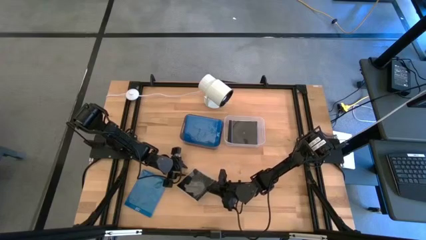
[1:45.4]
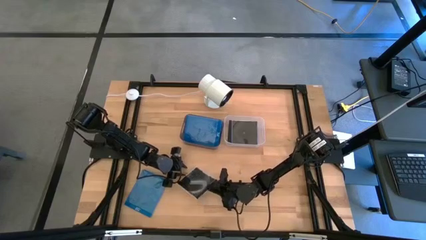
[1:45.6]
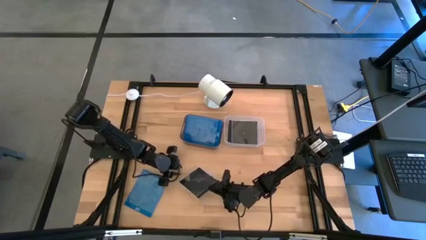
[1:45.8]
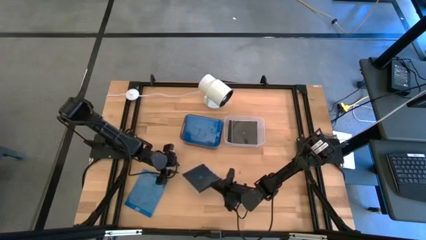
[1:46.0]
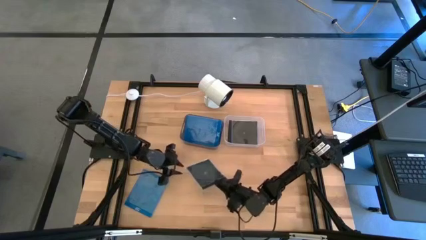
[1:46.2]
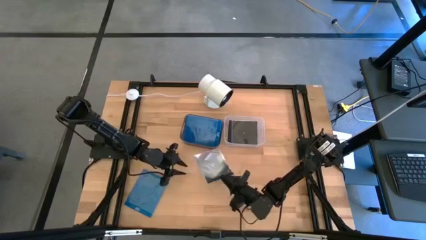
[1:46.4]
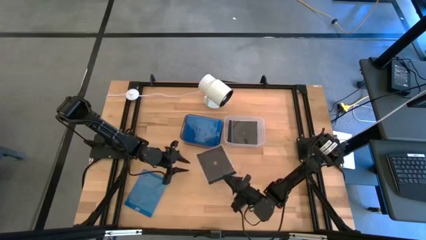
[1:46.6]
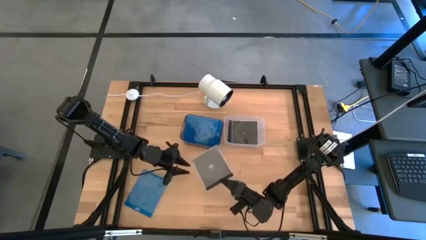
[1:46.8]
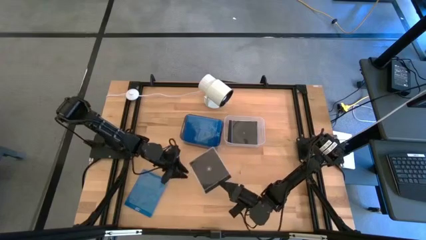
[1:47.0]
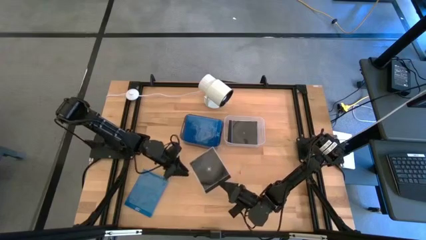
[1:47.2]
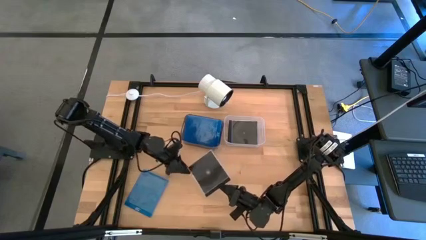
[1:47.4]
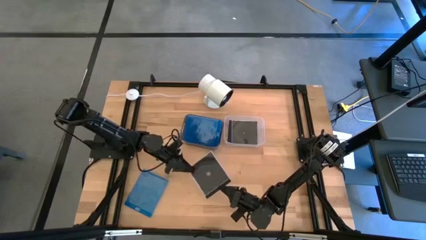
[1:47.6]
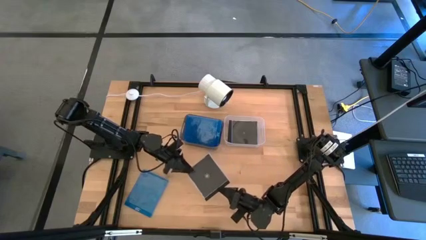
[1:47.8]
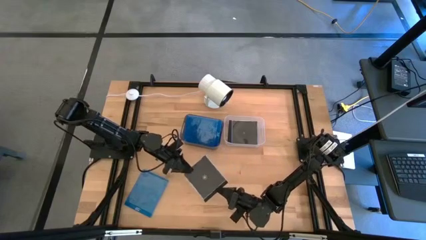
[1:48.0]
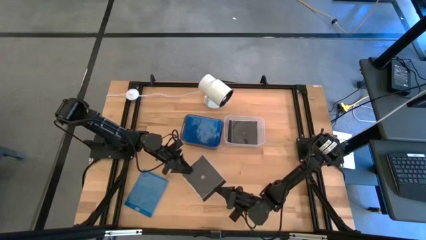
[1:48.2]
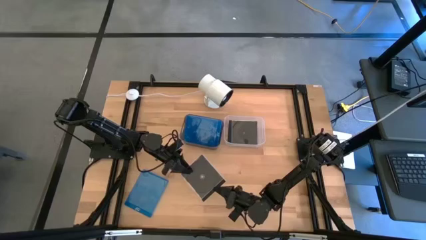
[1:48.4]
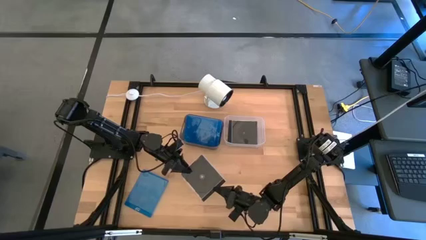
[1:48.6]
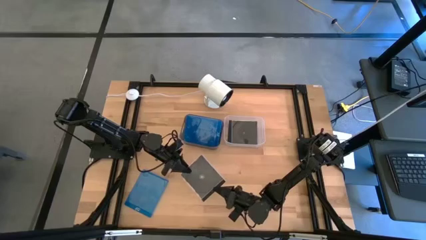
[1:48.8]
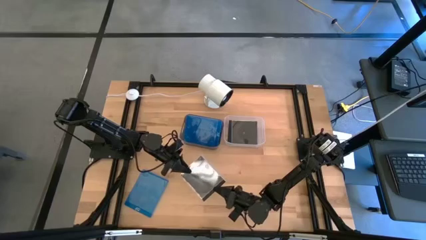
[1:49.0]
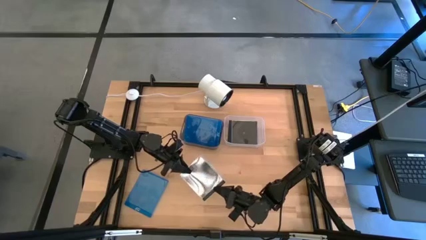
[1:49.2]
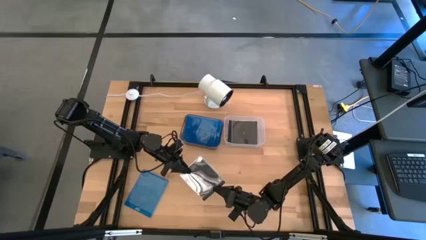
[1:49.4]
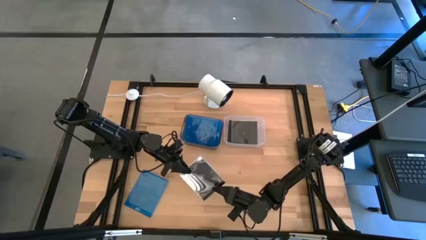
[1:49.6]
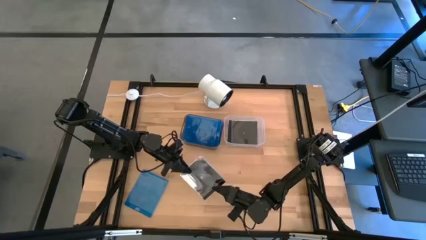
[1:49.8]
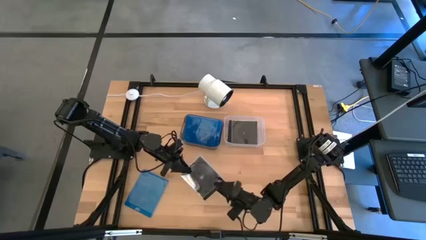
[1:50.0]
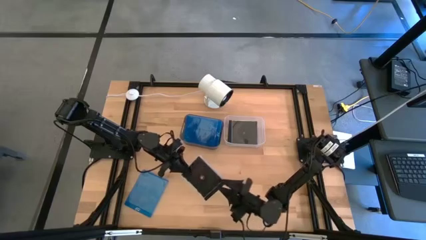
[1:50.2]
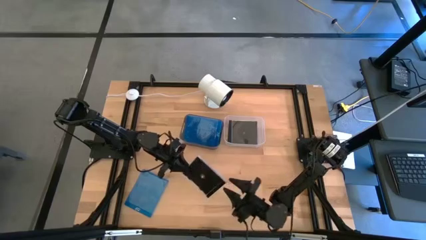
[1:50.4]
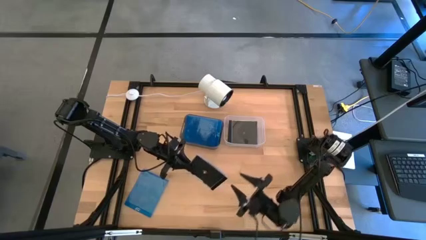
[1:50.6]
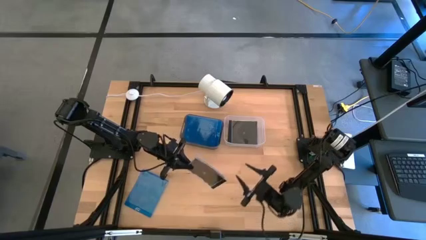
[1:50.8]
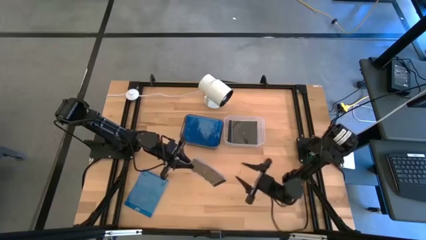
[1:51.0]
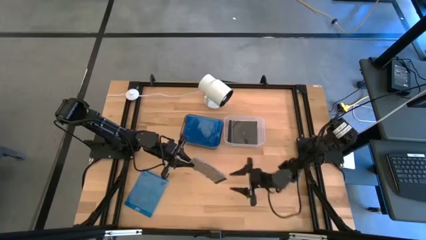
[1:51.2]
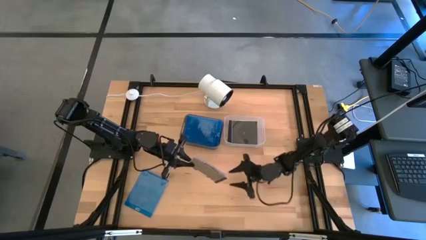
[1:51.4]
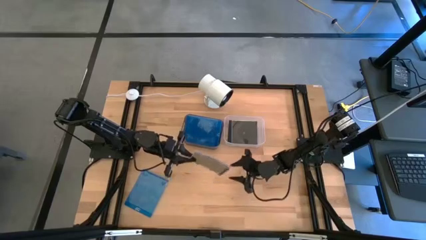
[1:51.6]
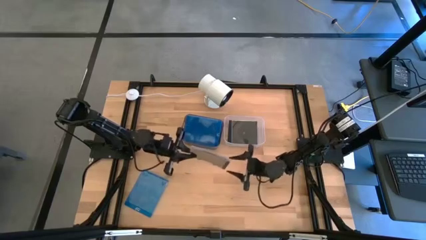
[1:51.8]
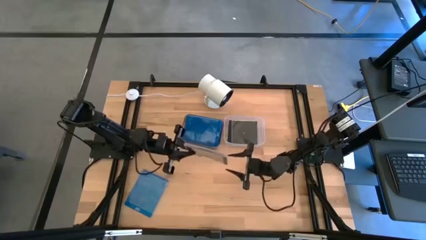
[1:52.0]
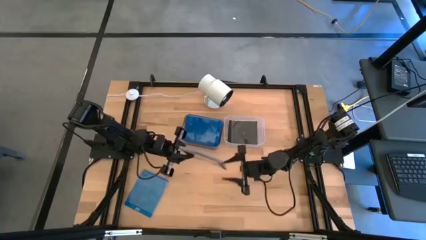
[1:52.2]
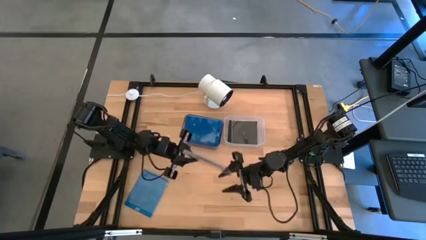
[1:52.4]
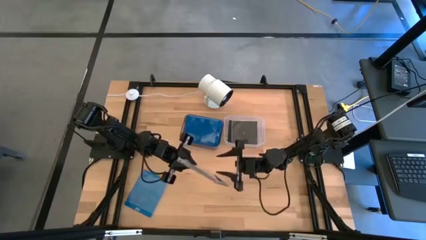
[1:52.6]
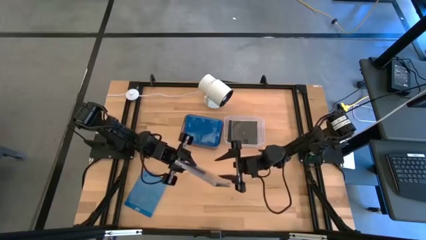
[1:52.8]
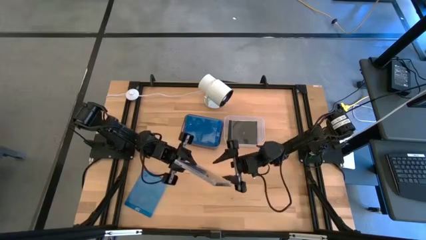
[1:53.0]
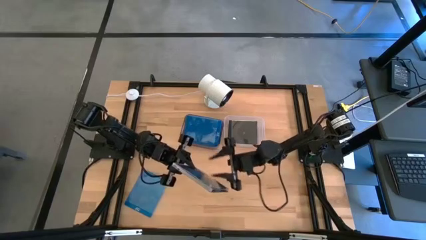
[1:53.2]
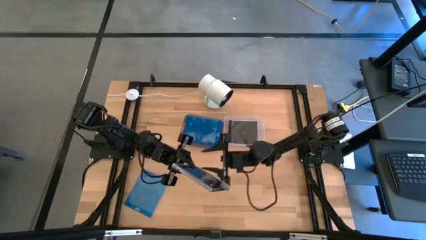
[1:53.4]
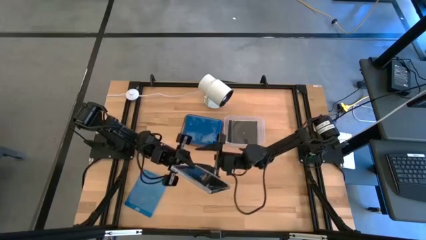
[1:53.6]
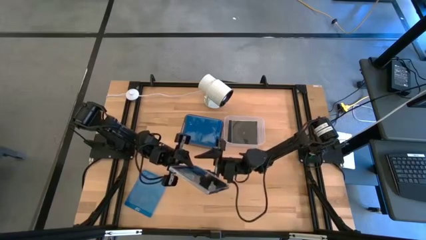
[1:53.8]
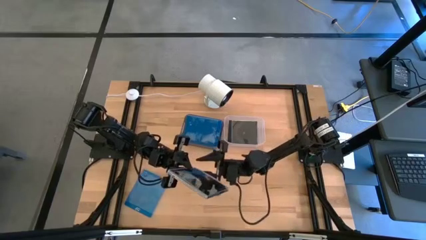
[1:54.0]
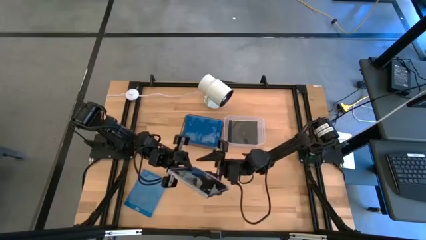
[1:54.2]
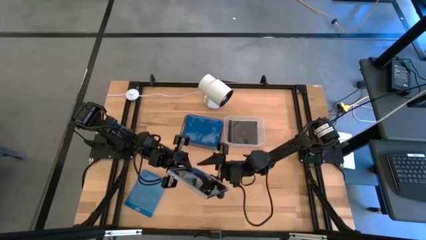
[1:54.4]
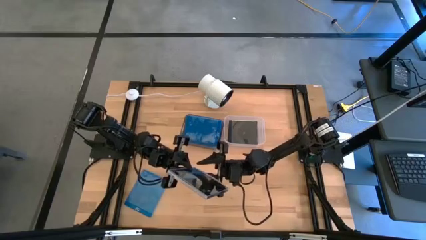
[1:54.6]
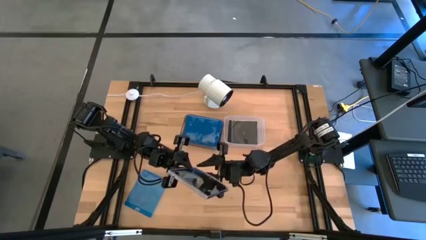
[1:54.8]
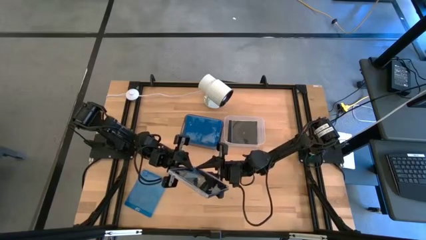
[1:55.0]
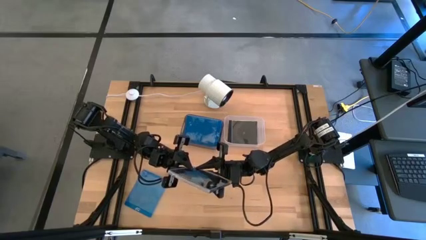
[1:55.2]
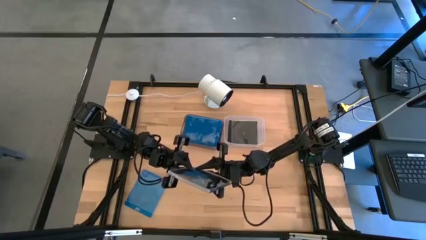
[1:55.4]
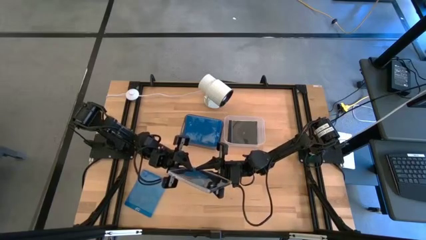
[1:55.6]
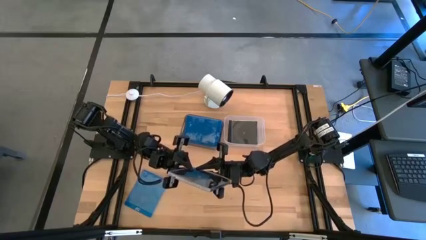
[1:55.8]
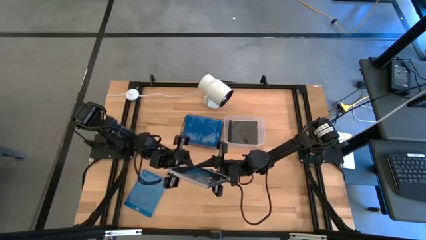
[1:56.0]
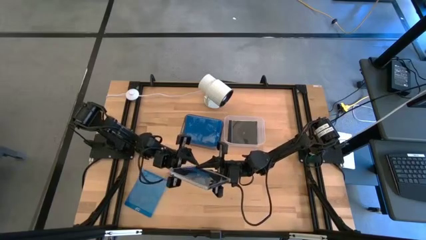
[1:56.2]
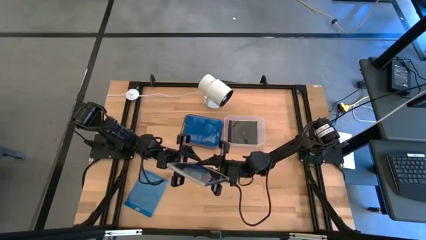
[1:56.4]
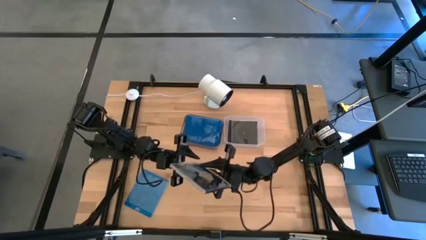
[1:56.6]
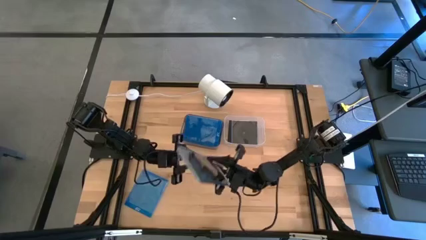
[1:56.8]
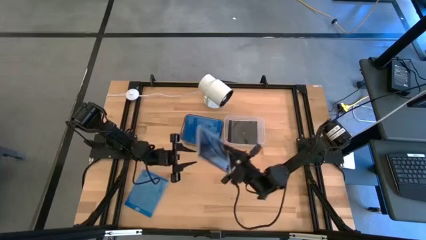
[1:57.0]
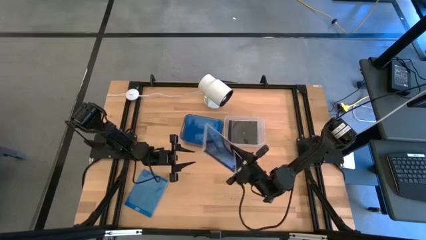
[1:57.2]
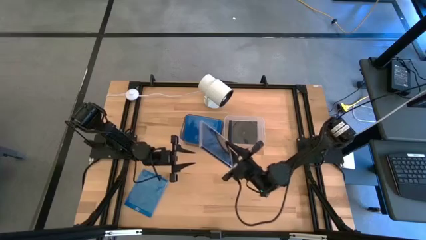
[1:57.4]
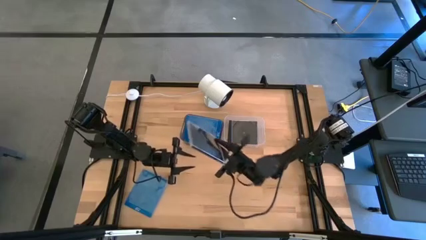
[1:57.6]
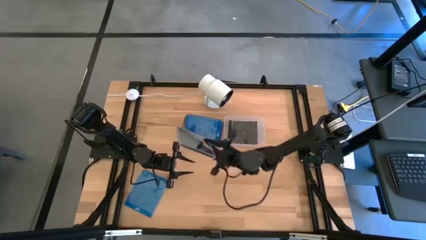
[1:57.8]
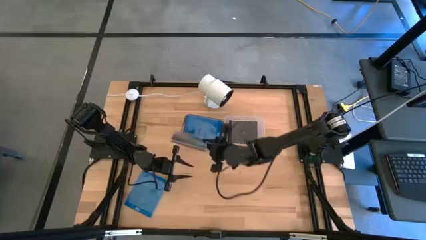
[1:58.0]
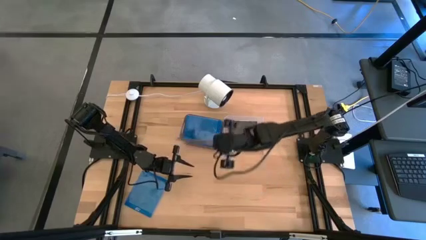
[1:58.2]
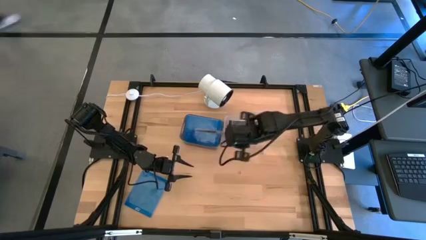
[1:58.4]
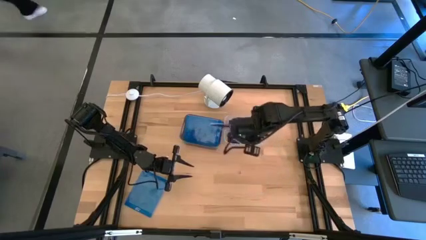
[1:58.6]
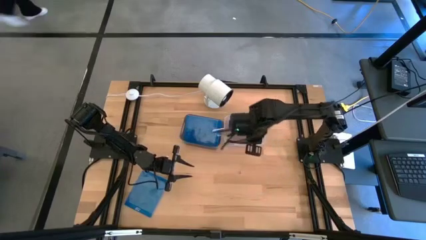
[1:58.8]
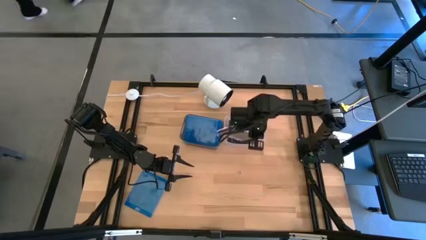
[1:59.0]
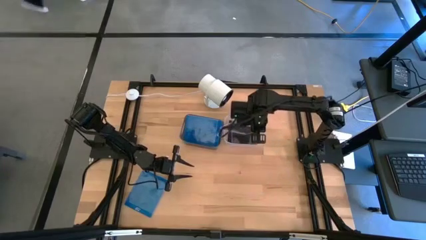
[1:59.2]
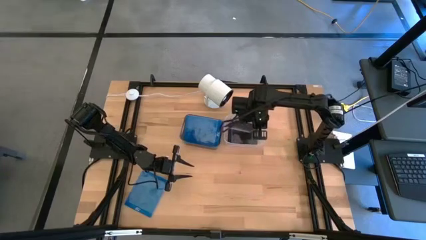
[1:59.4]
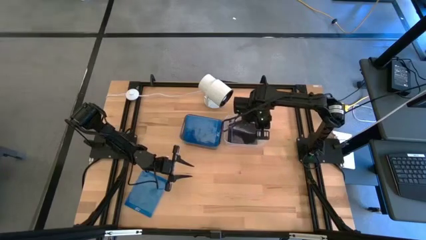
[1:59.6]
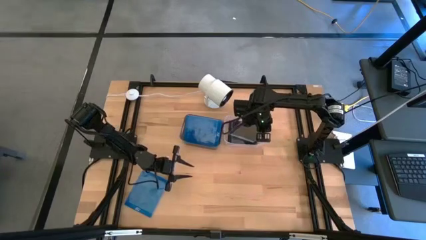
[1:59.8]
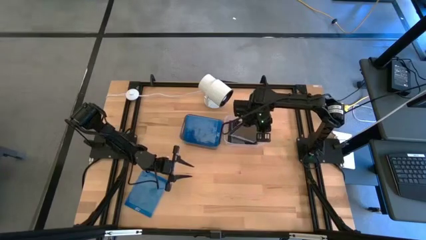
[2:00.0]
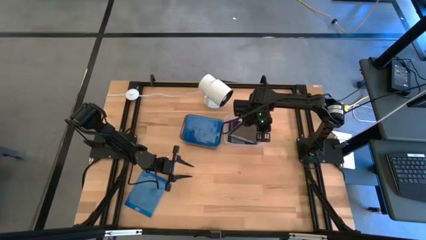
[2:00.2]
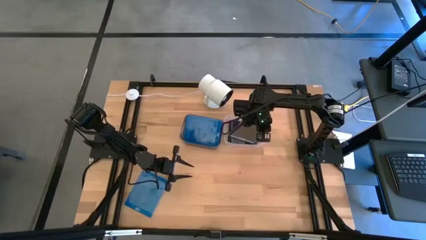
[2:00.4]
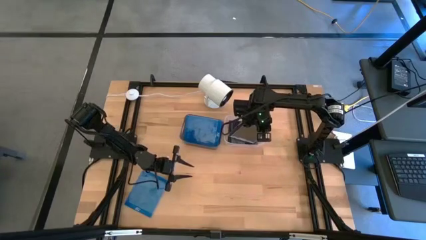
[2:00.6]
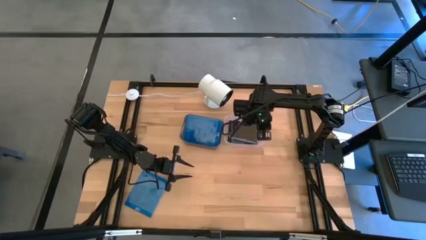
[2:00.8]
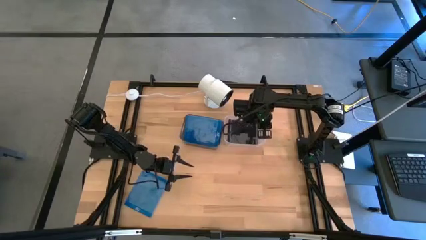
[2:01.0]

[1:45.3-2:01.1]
Task: Pick & place jewel cases by type
Put the black cd case into the transparent bin
